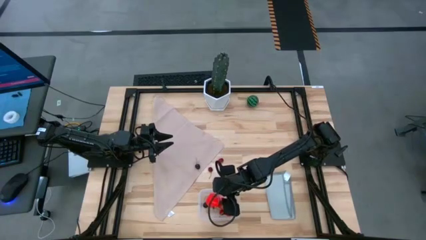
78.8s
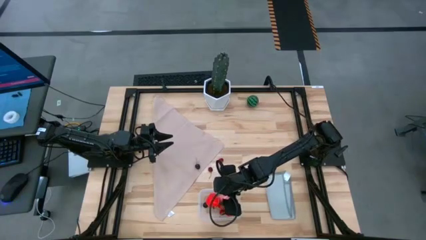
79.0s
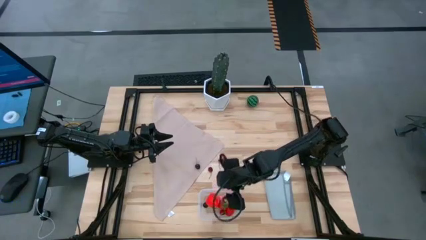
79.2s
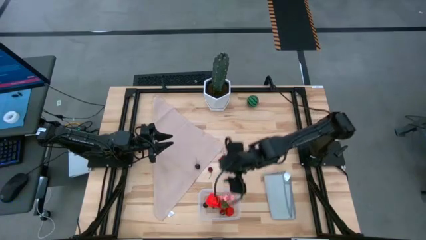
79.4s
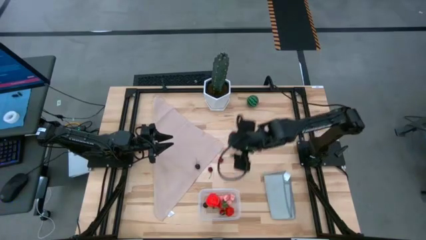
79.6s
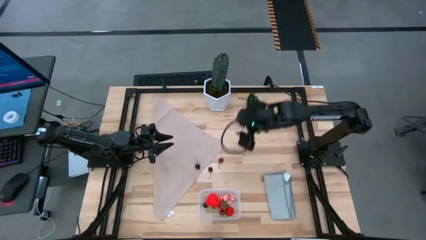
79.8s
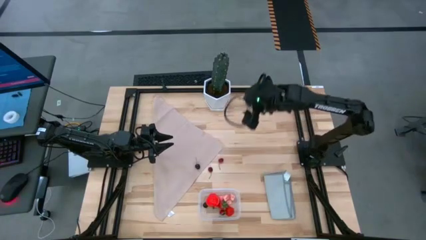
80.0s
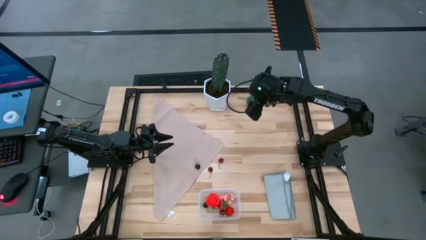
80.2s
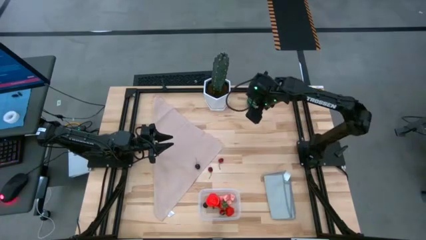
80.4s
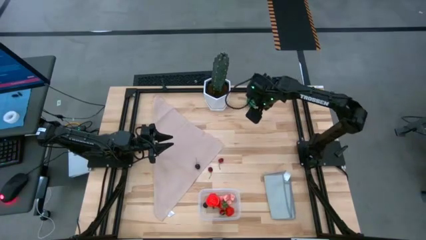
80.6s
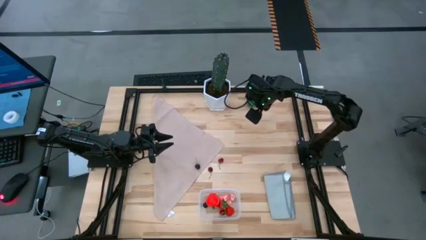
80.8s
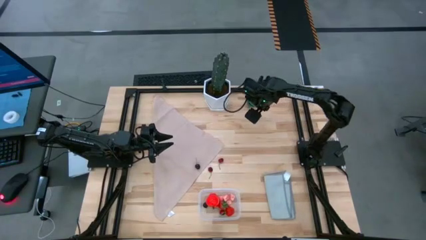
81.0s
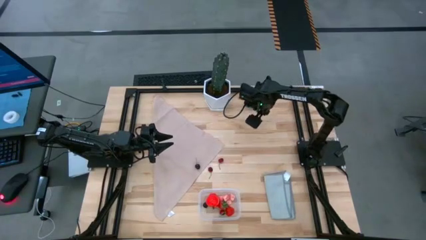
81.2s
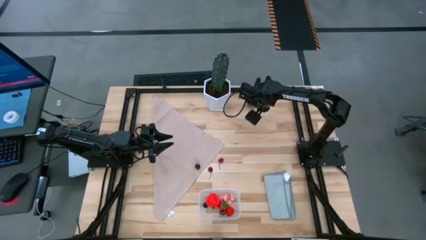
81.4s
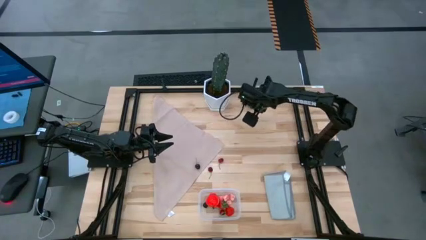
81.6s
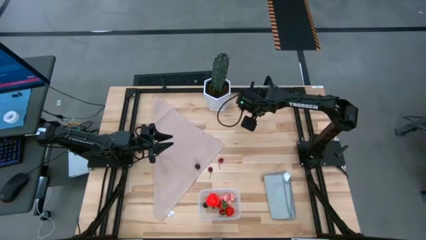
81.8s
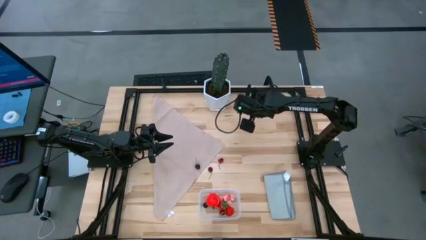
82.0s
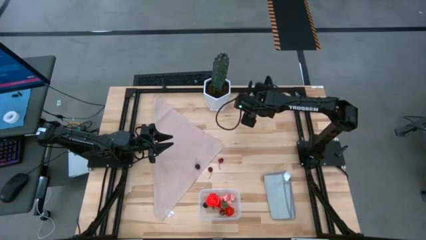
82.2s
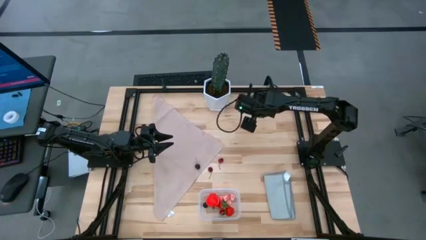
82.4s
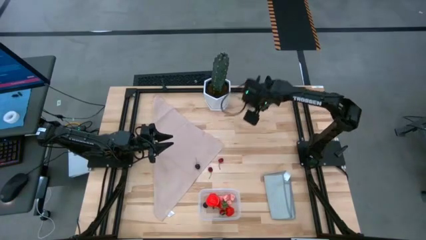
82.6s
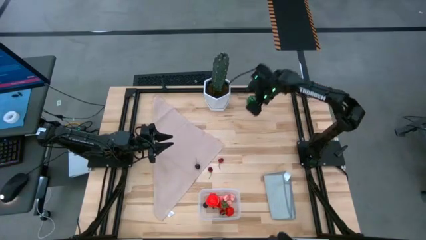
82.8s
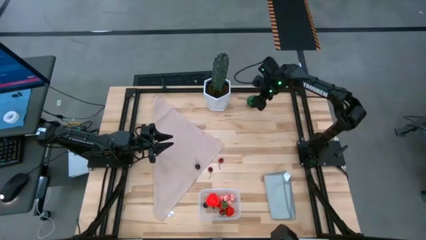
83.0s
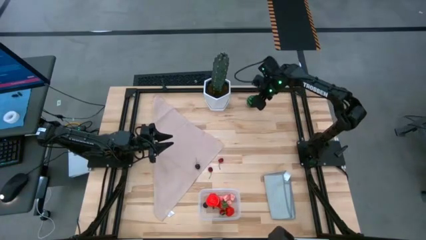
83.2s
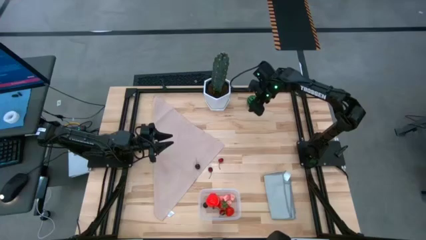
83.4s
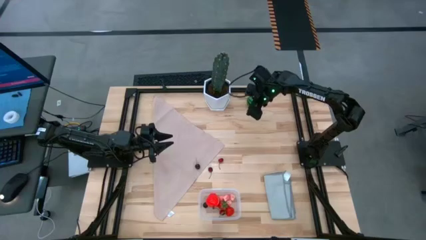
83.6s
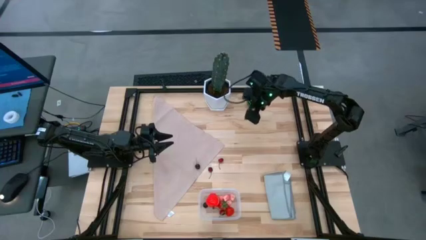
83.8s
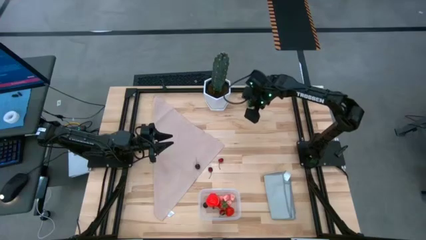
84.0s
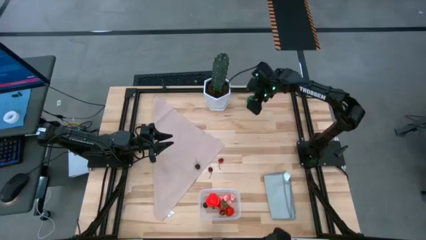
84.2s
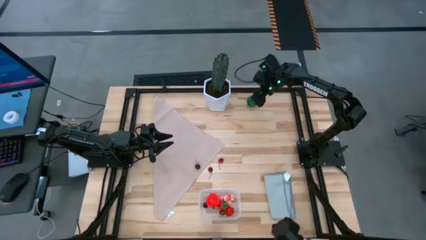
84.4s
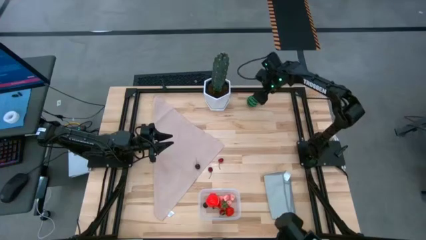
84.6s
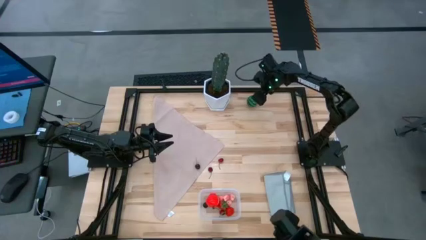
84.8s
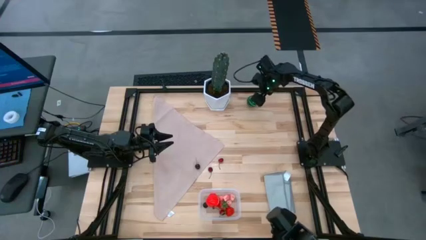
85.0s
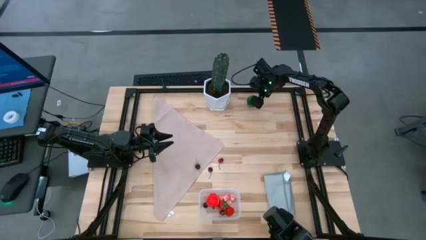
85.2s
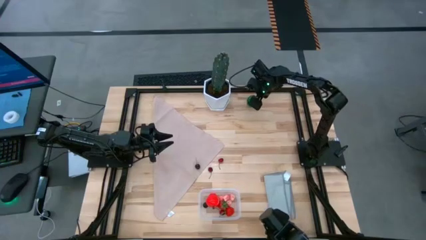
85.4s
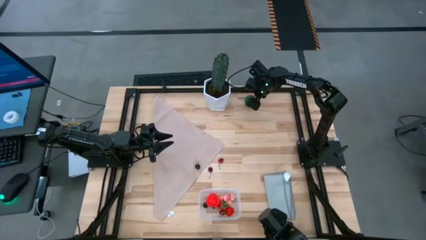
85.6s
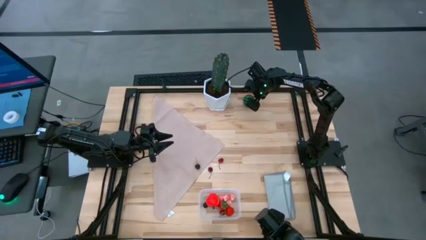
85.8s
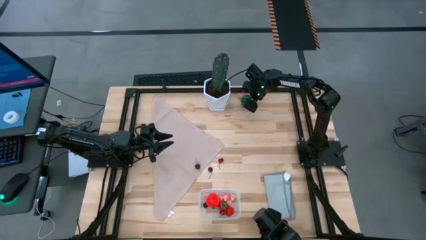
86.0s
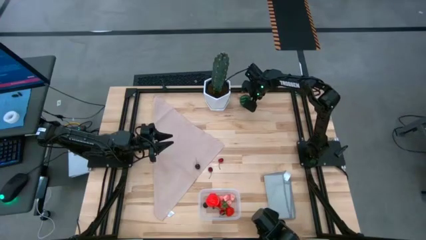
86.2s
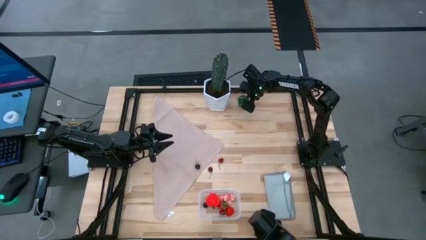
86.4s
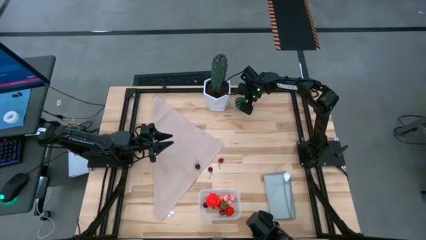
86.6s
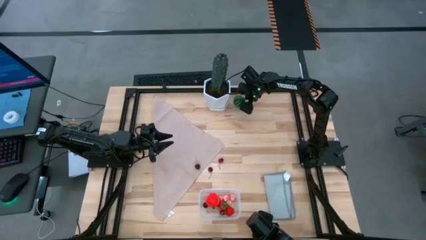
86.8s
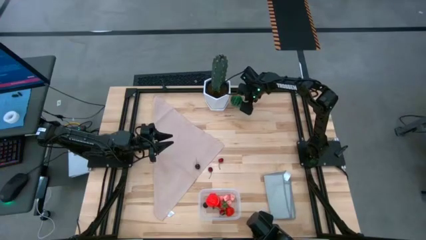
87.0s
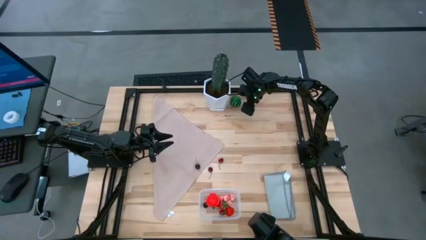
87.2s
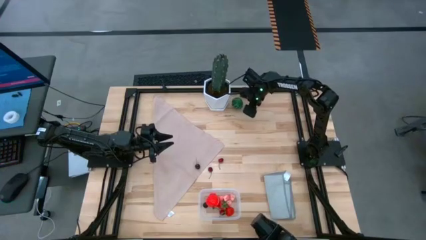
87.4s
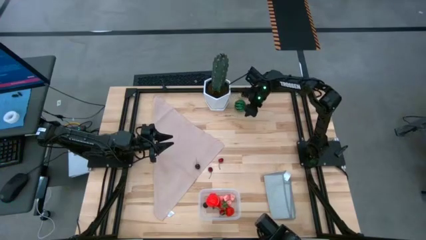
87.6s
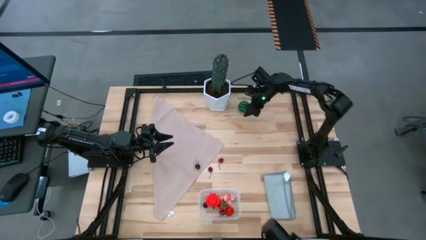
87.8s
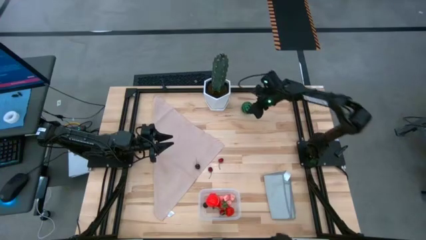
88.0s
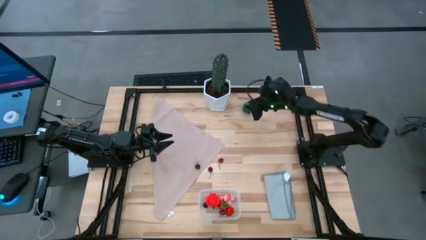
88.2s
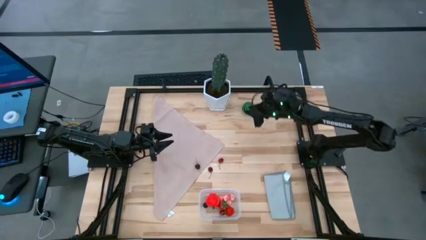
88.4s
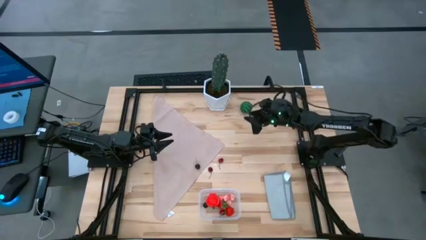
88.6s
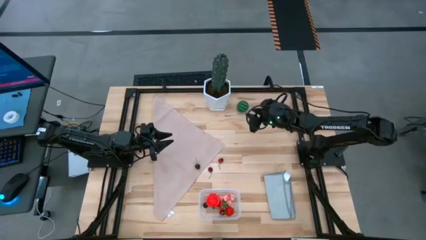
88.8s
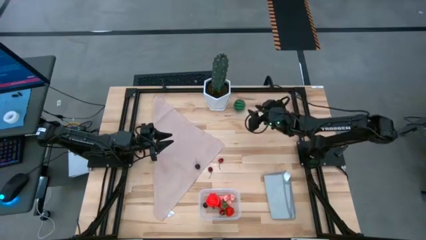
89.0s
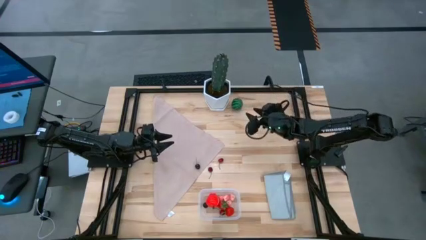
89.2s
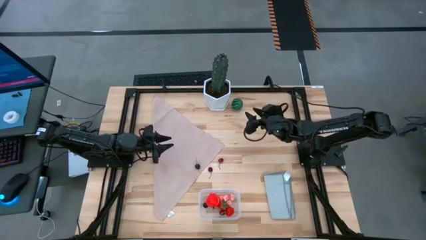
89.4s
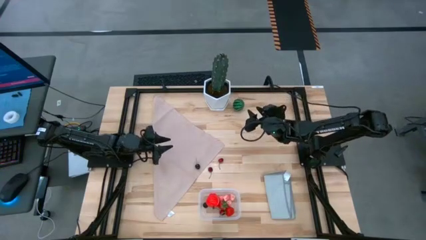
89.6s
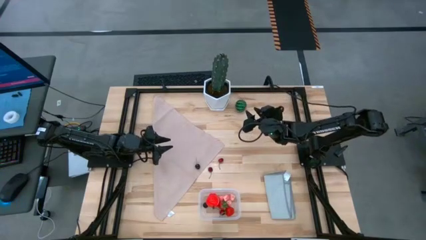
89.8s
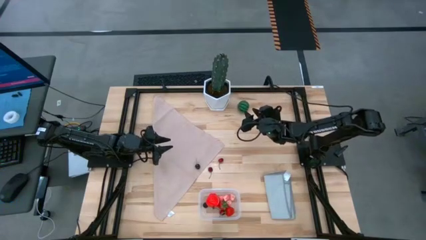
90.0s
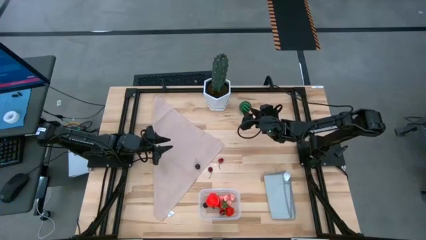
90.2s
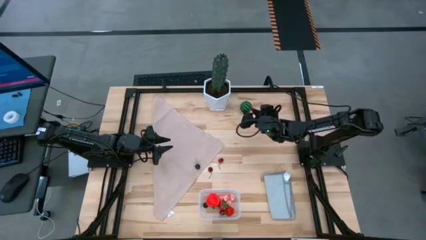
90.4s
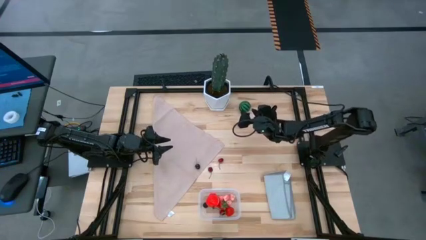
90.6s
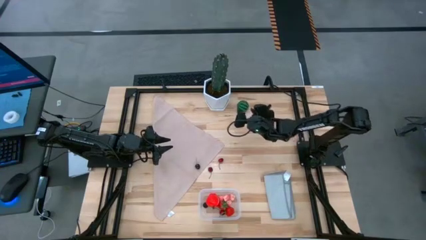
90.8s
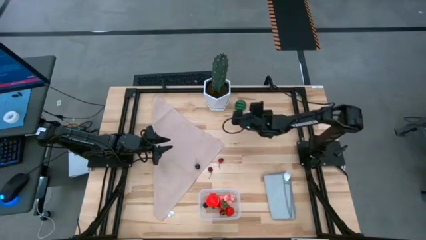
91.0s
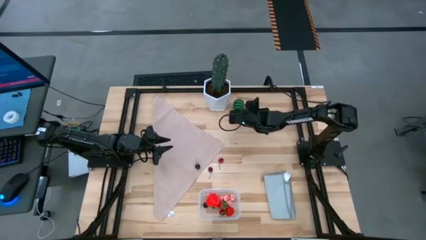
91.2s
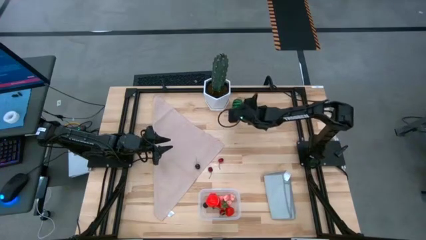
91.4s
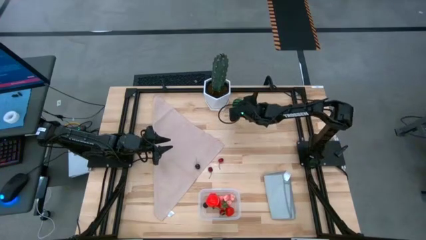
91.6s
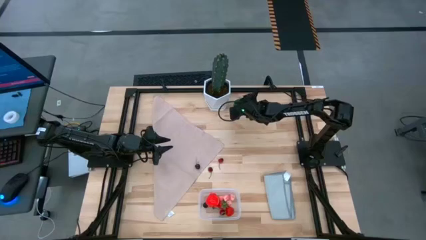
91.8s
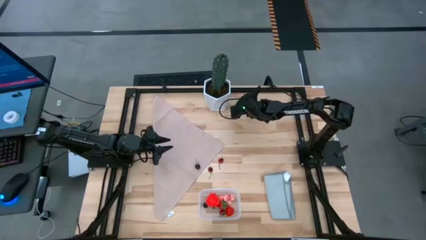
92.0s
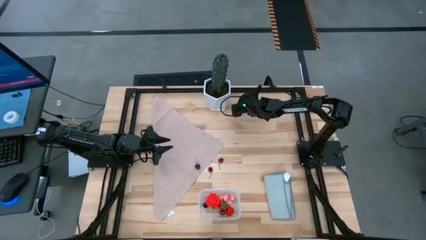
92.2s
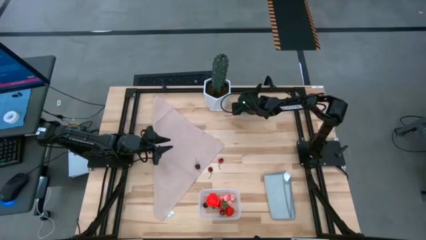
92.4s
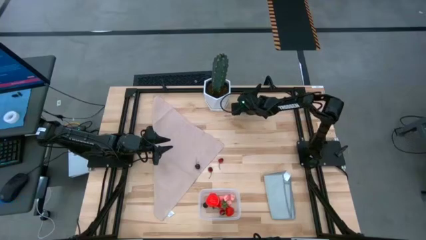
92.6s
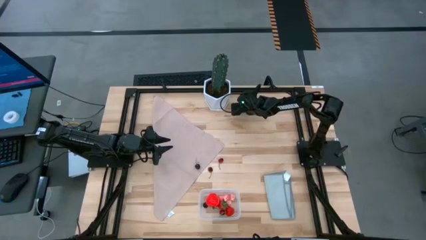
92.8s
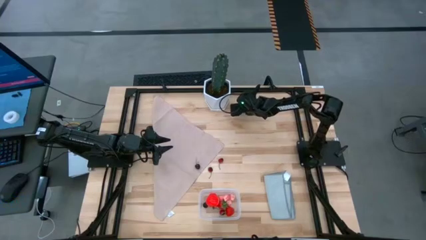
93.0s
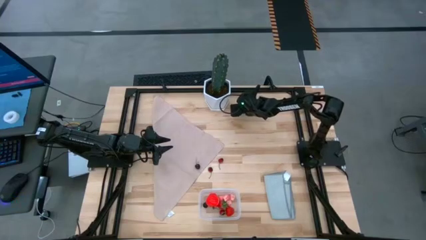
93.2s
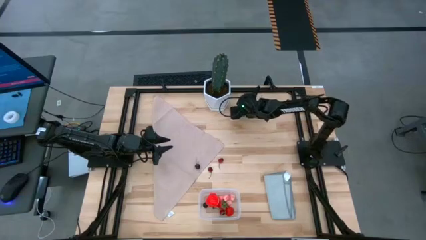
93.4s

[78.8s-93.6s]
Task: Pick and placing Produce into tupperware
Put the watermelon into the transparent bin

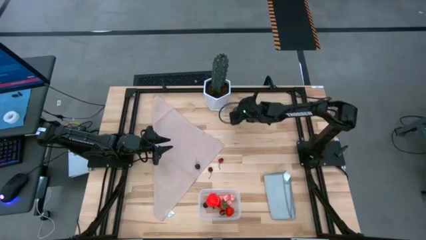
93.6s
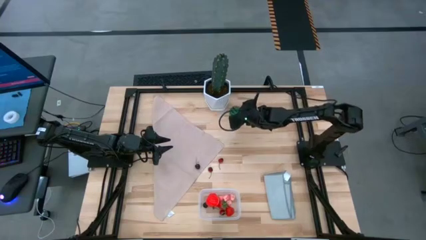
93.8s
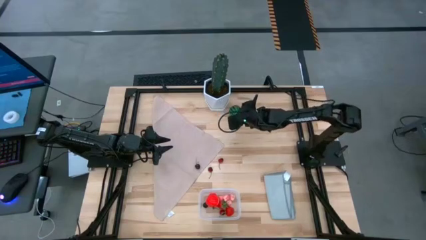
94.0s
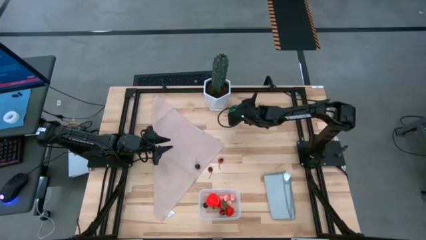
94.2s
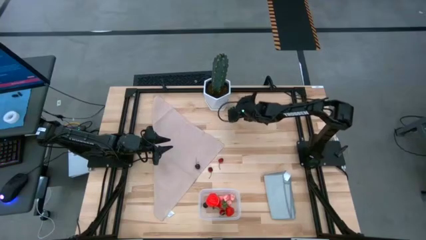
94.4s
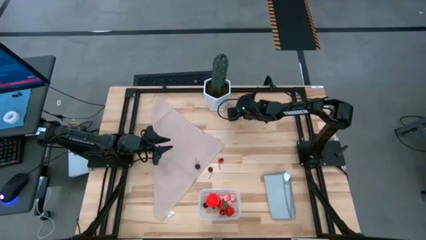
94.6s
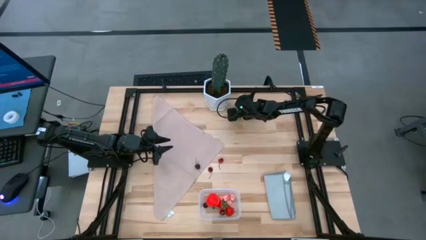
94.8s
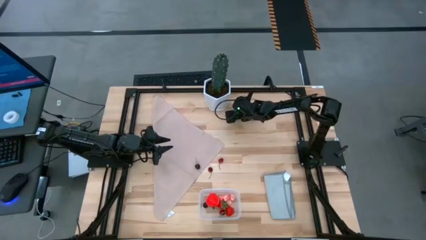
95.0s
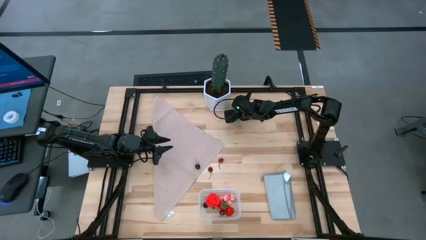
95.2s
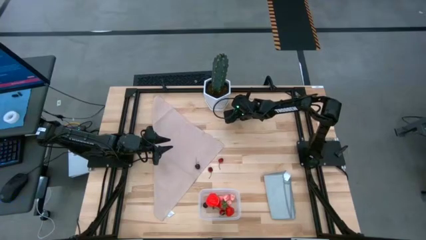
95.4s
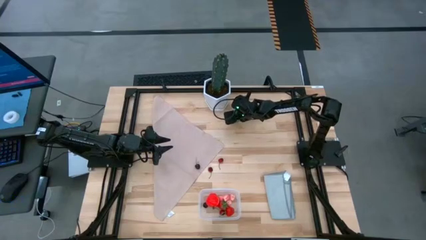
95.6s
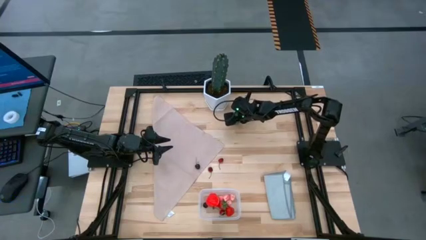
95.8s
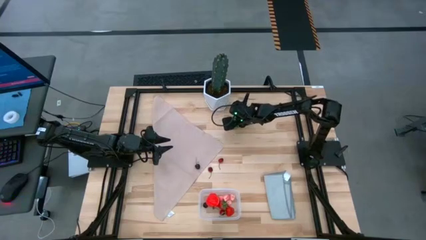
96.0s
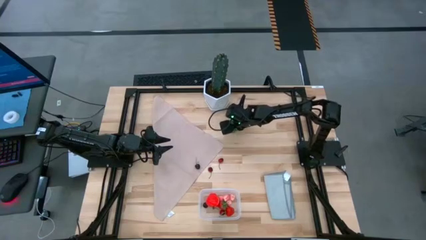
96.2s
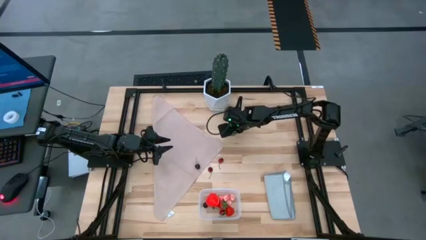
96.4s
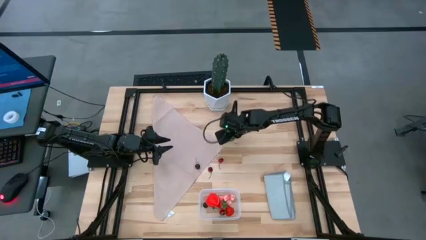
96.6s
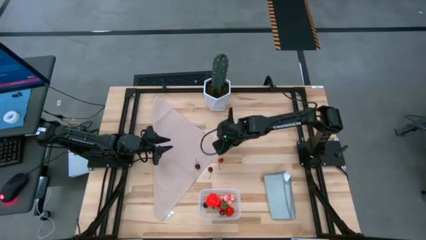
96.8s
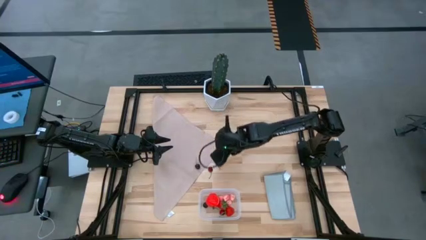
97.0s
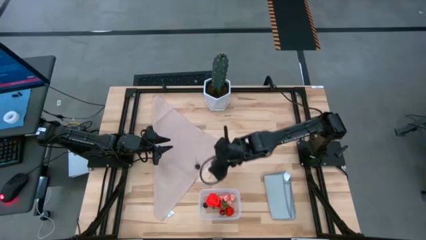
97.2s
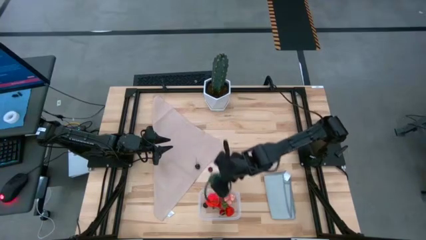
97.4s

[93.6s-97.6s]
Put the watermelon into the transparent bin
